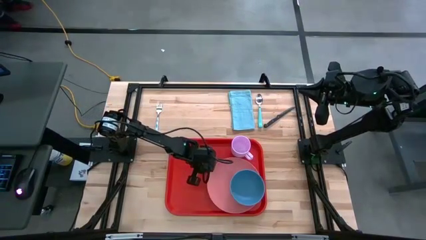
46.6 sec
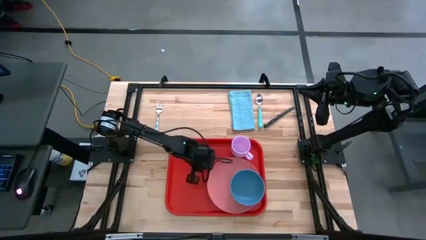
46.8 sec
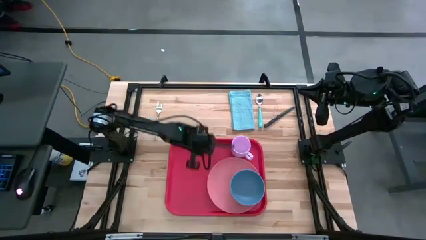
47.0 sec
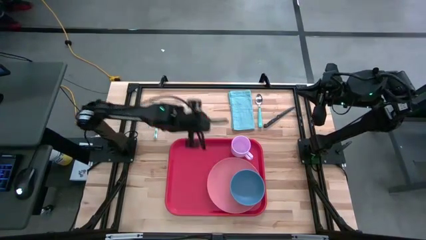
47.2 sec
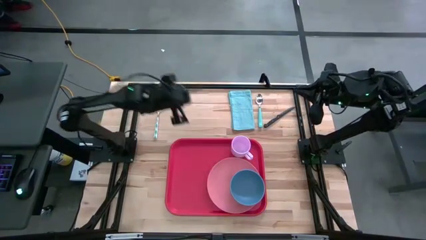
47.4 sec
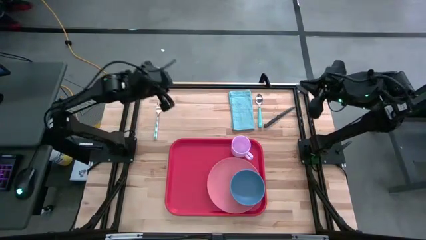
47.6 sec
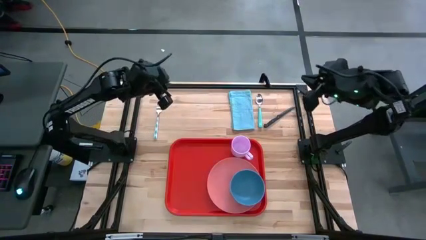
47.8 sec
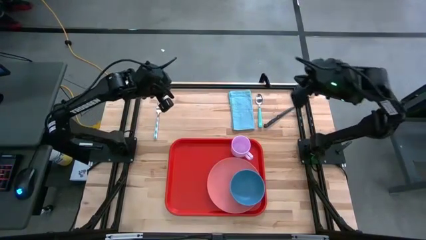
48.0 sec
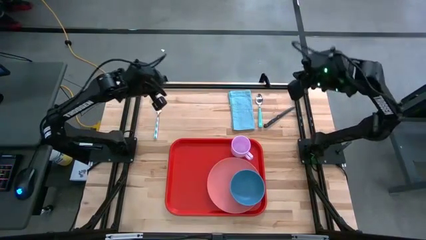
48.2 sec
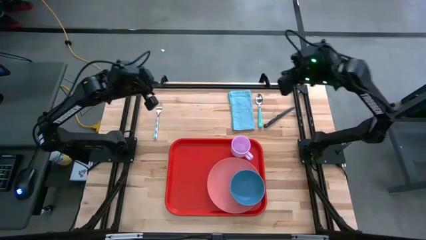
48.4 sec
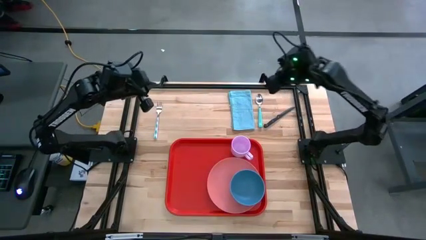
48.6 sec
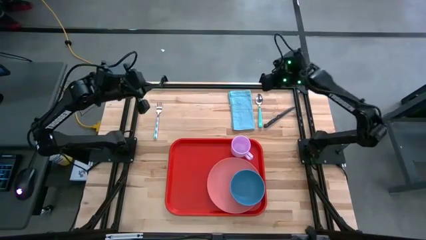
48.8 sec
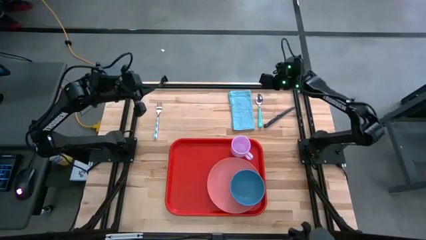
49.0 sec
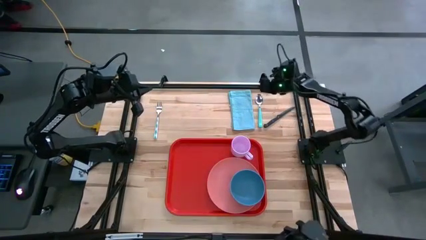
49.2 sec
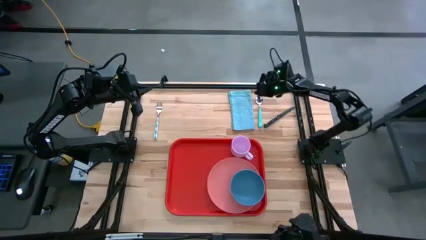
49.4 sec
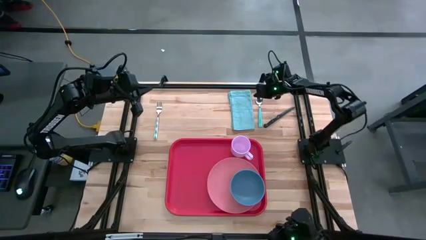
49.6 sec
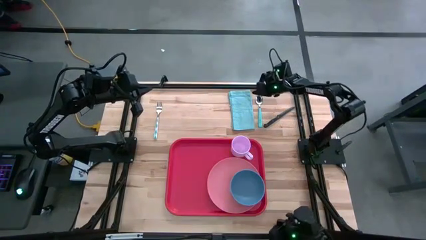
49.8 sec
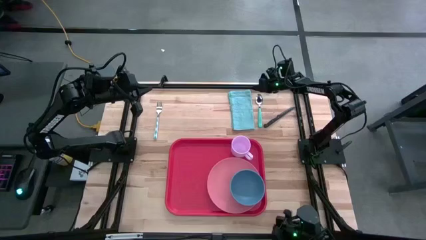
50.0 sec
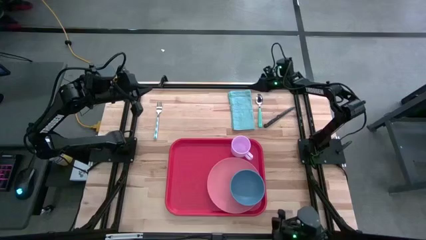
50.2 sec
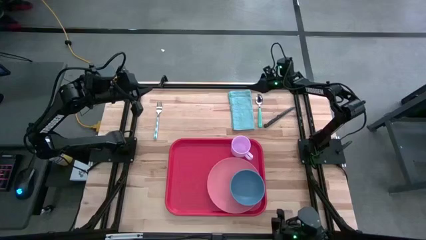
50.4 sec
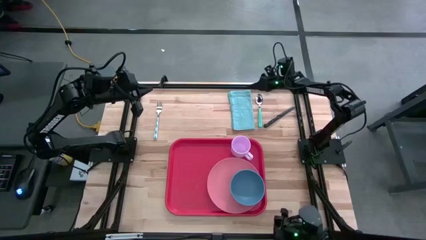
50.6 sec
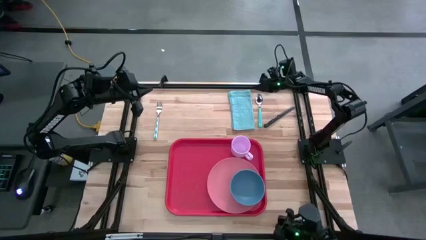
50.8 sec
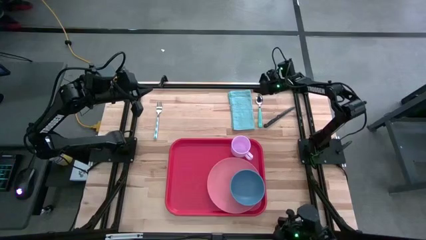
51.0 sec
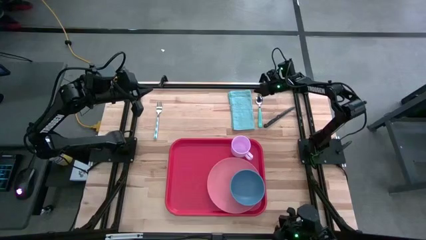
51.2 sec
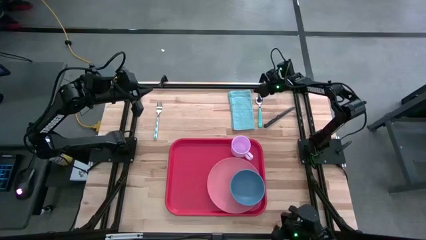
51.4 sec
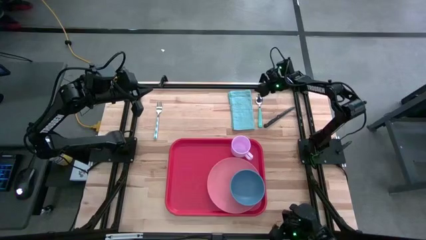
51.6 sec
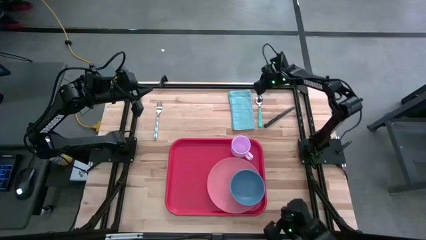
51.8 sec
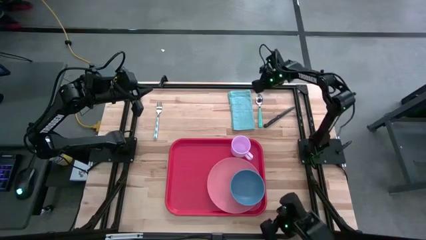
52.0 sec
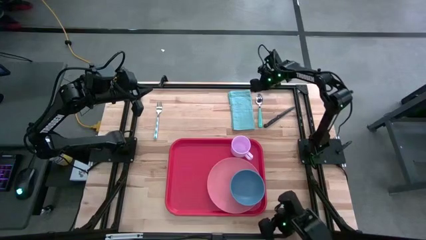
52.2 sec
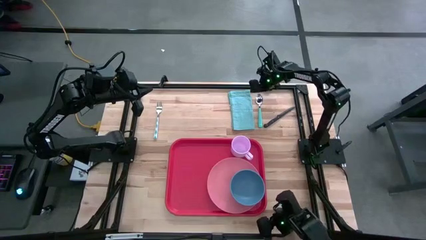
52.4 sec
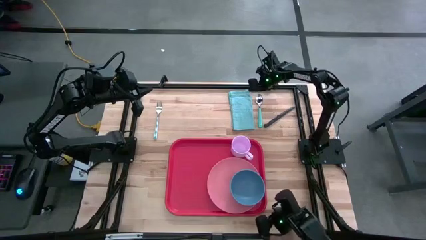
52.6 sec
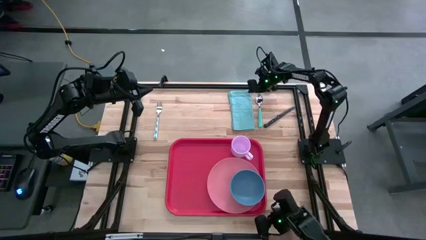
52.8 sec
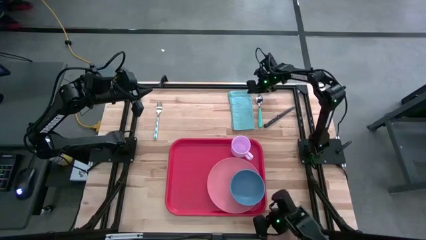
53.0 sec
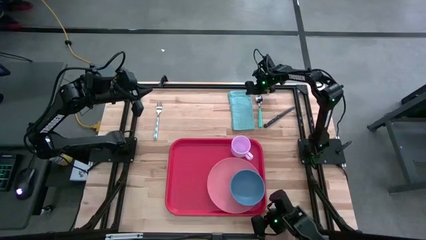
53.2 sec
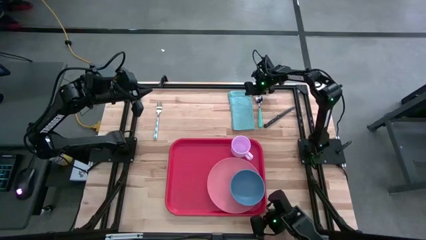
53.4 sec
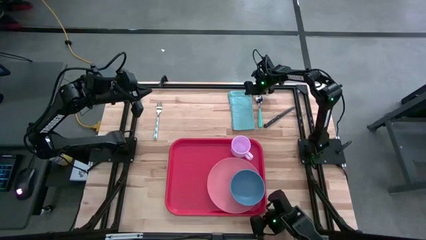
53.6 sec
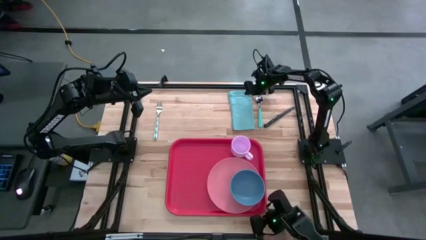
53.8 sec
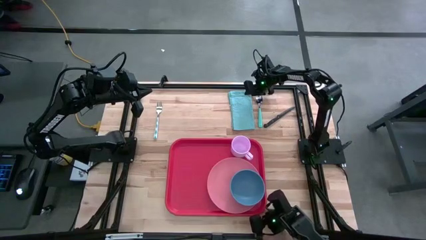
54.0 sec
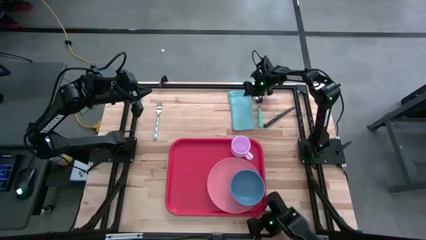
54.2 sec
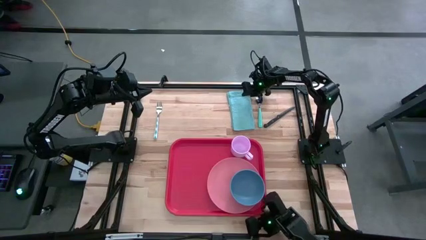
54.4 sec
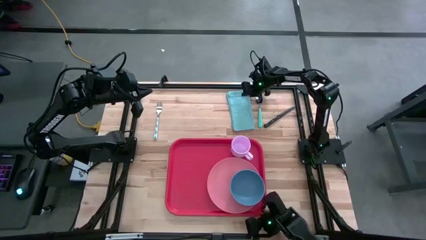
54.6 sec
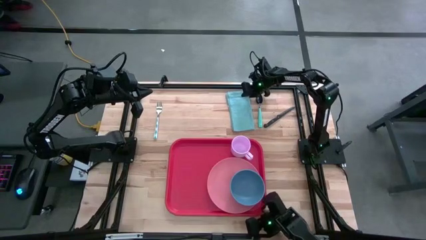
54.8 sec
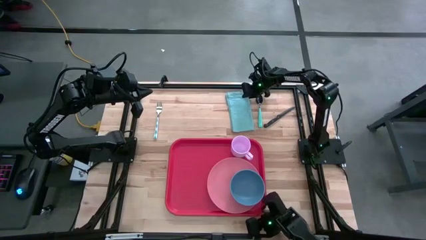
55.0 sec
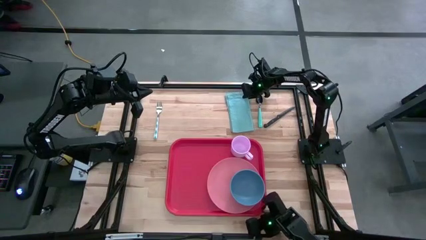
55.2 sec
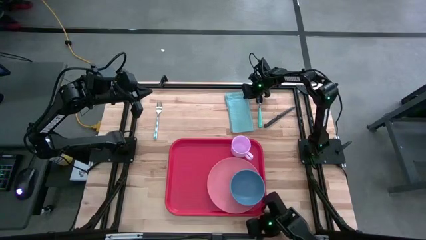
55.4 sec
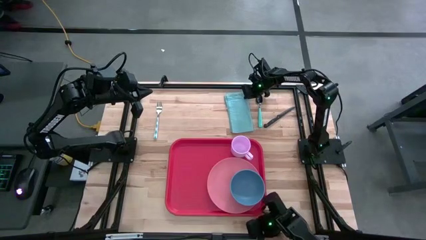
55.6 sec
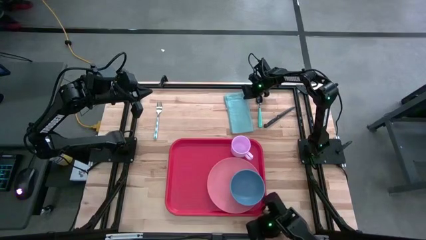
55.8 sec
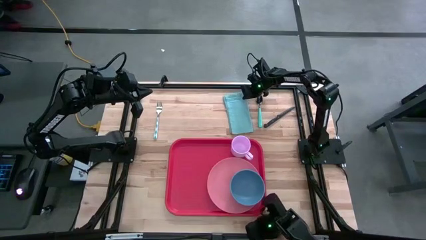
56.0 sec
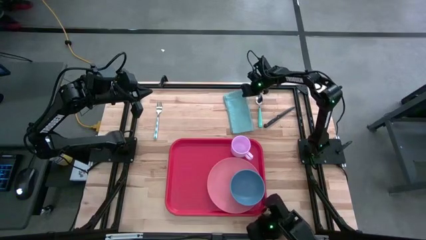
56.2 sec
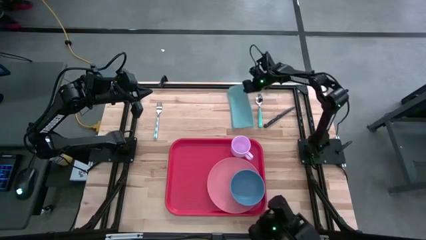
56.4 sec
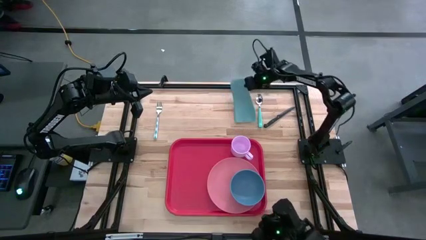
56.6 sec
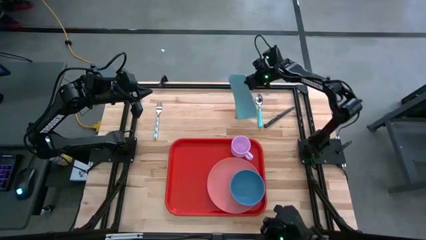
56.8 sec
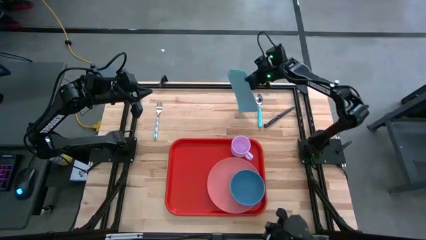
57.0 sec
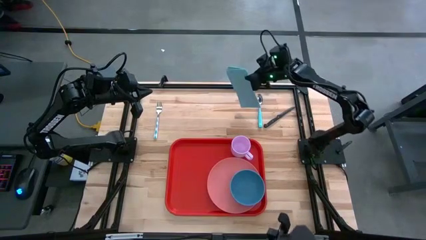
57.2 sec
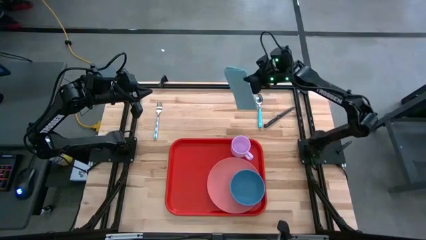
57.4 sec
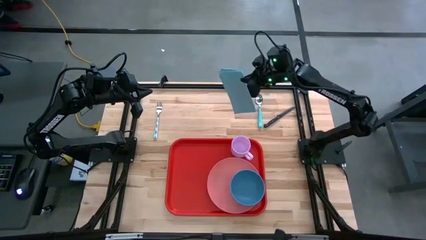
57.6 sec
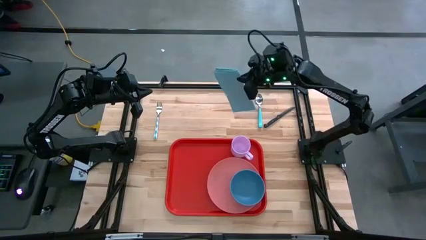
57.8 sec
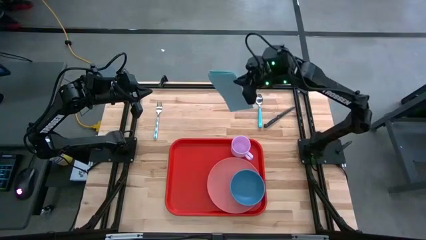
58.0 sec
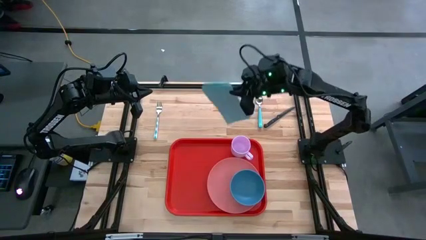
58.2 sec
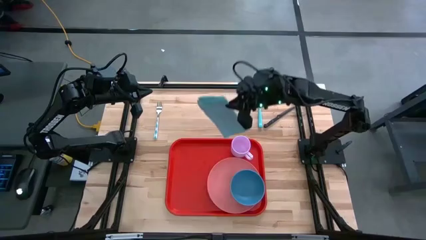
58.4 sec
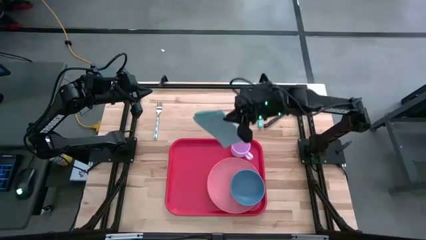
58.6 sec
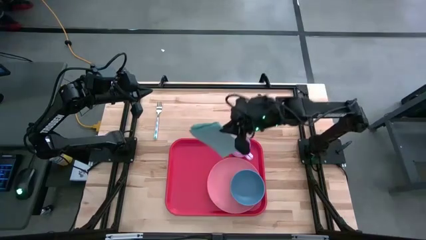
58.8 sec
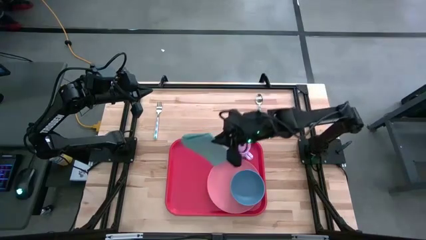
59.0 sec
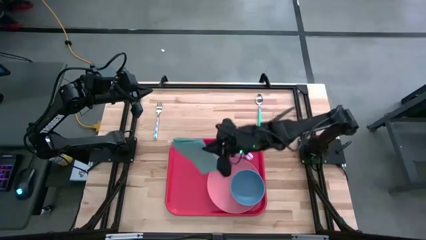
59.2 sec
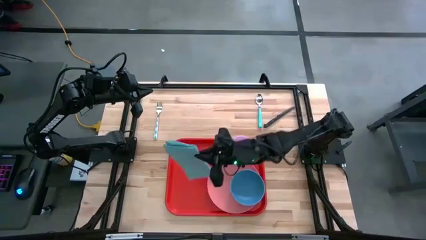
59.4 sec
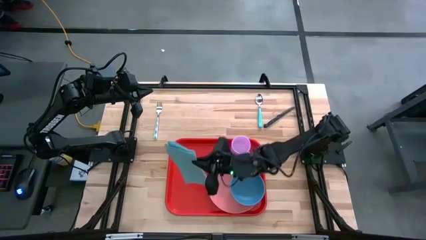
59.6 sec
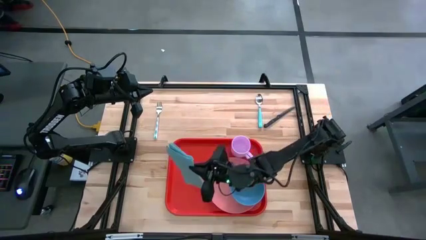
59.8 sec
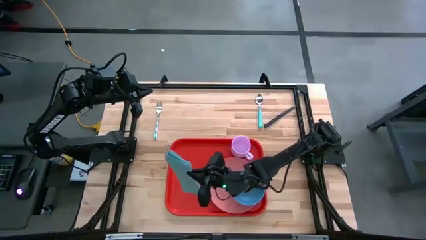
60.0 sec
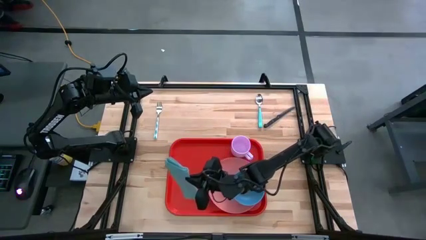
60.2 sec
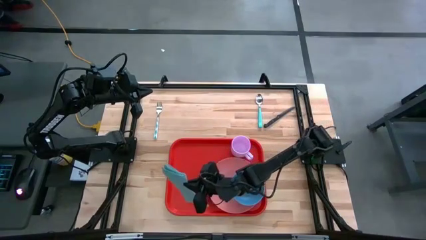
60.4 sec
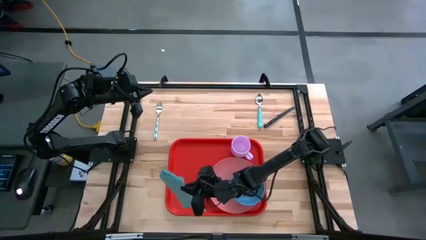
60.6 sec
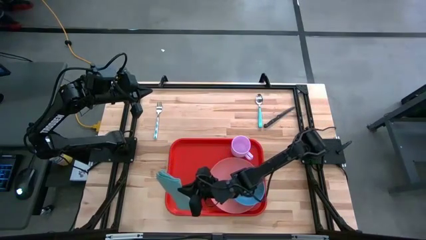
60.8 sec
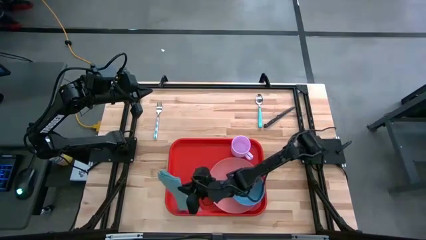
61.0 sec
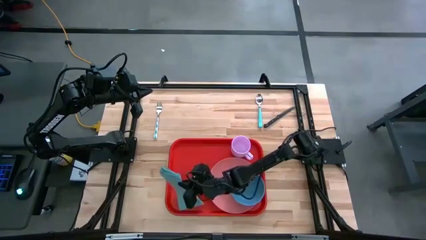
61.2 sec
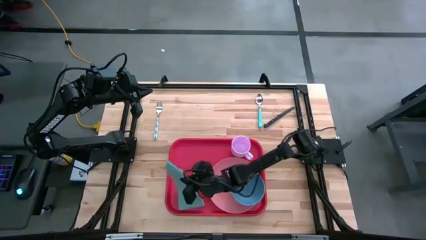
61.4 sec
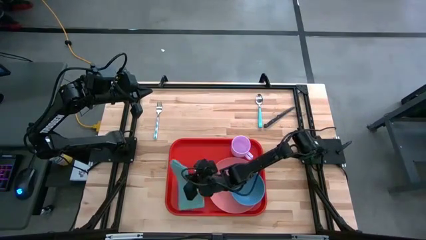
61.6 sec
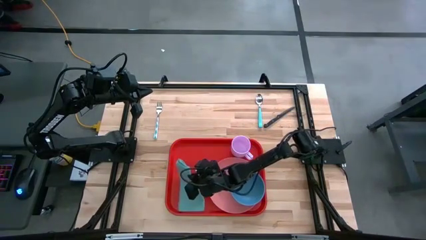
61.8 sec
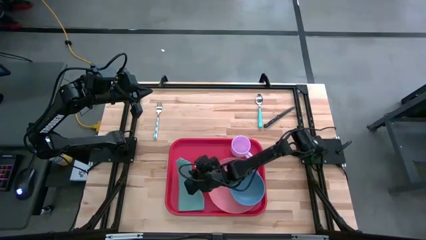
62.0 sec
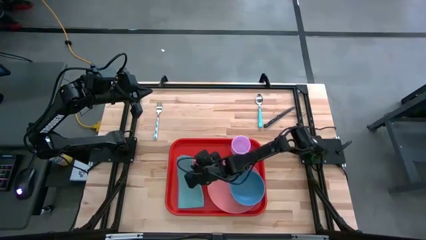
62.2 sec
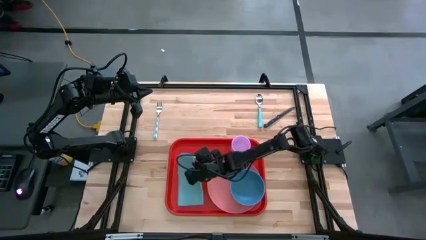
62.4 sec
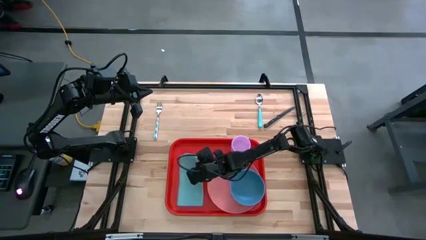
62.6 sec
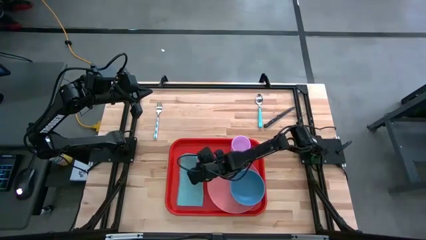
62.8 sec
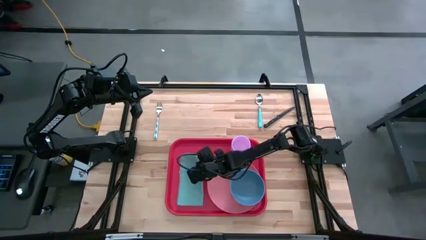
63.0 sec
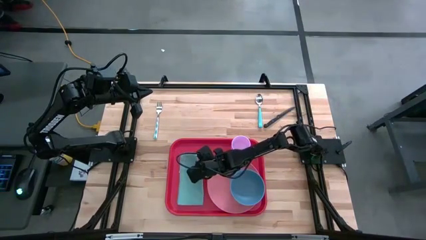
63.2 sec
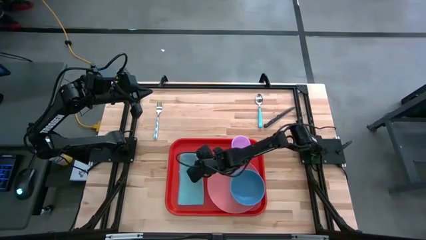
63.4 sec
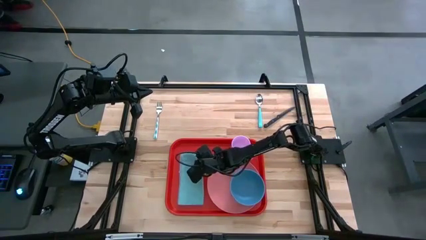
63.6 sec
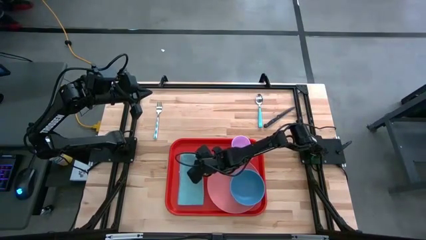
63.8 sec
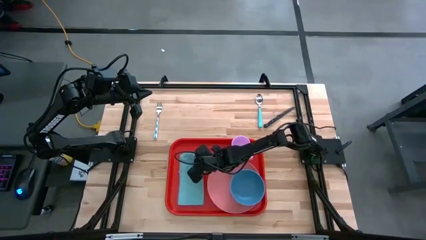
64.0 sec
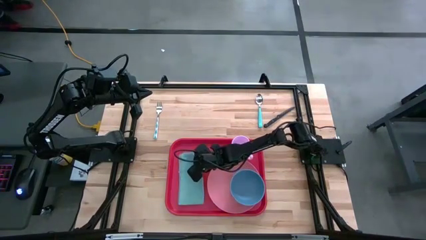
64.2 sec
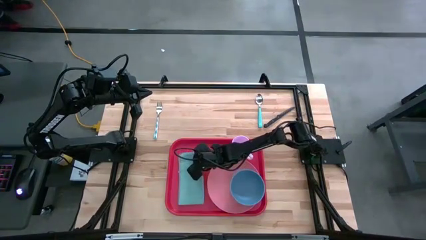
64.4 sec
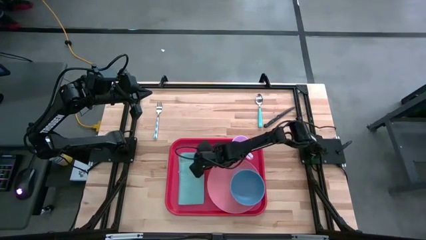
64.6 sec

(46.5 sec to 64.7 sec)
Task: Set up tray
Put the blue napkin on the red serving tray to the left side of the pink plate
